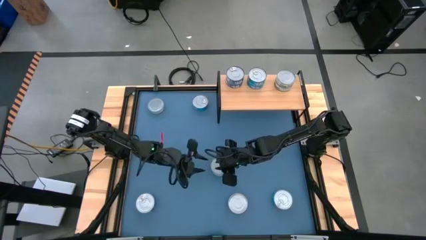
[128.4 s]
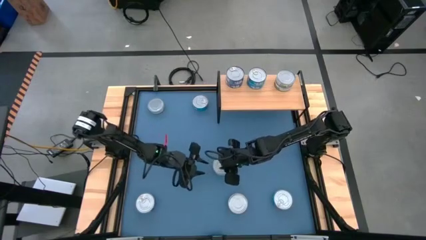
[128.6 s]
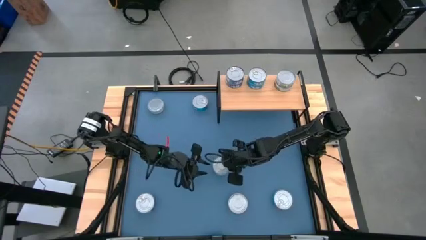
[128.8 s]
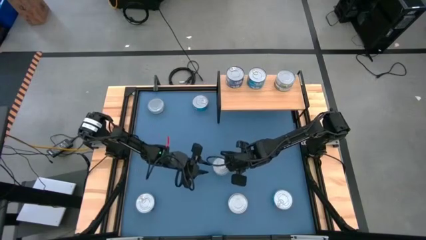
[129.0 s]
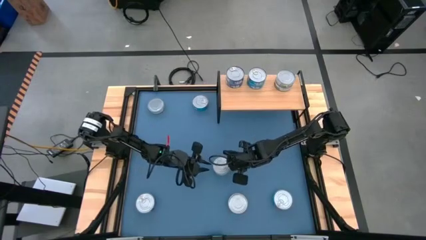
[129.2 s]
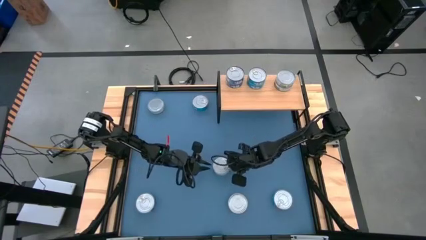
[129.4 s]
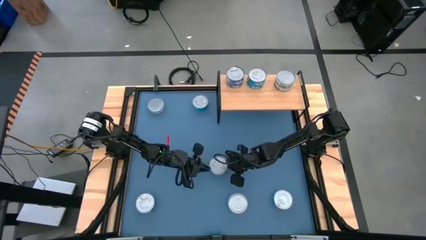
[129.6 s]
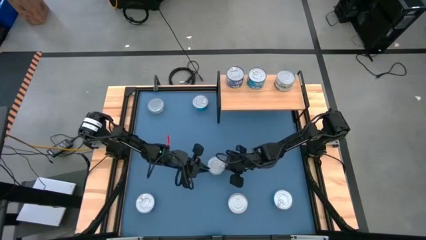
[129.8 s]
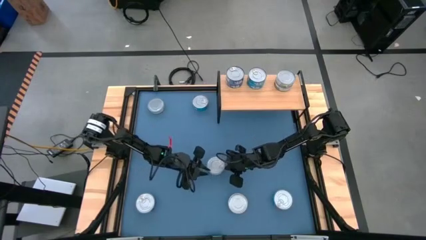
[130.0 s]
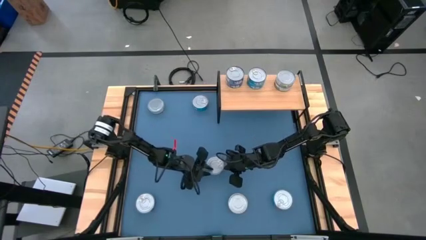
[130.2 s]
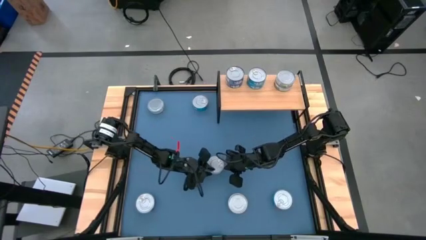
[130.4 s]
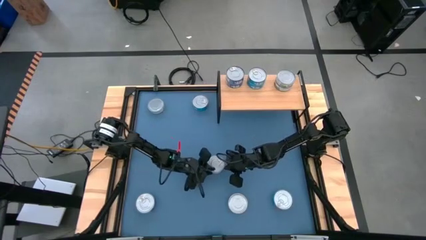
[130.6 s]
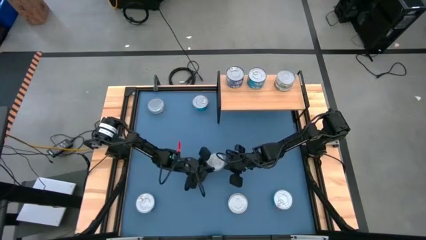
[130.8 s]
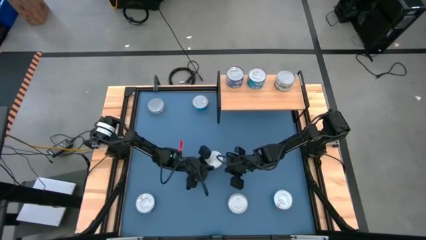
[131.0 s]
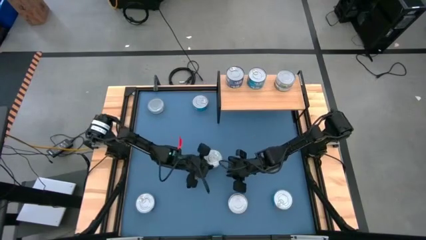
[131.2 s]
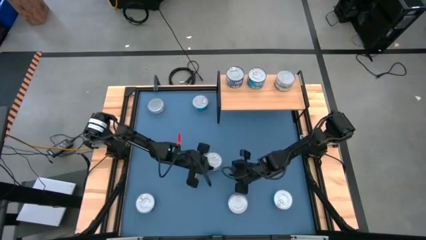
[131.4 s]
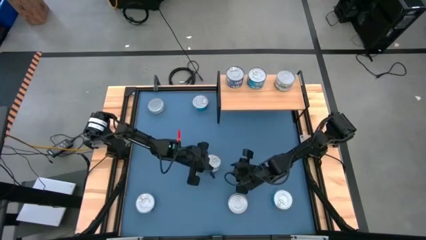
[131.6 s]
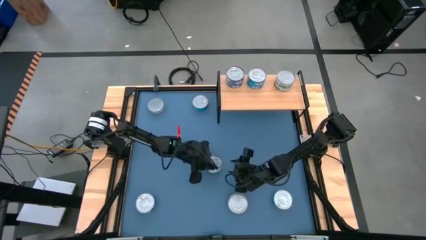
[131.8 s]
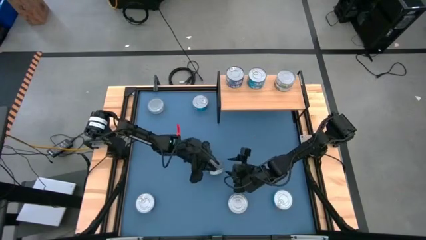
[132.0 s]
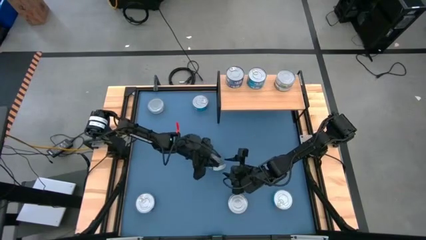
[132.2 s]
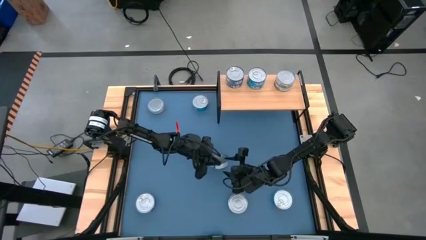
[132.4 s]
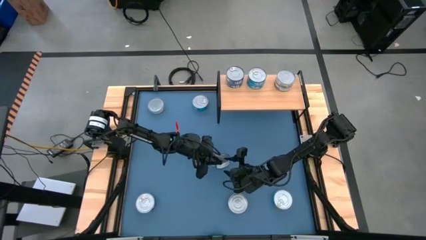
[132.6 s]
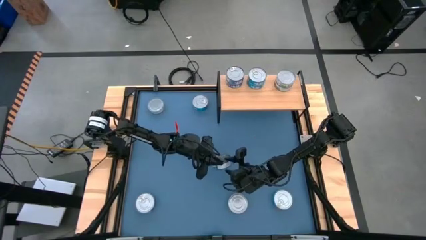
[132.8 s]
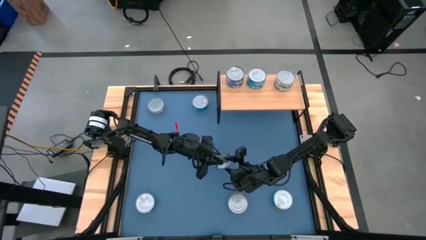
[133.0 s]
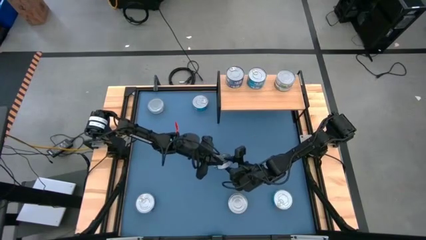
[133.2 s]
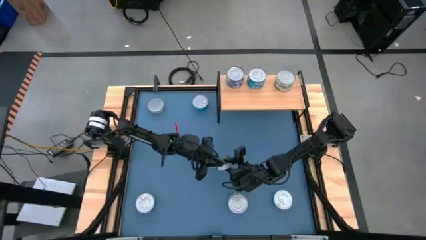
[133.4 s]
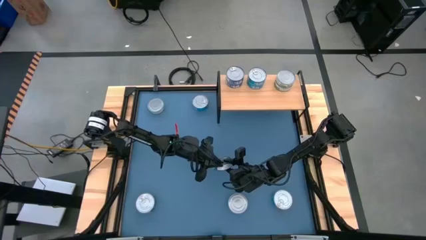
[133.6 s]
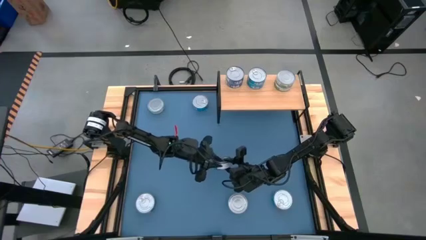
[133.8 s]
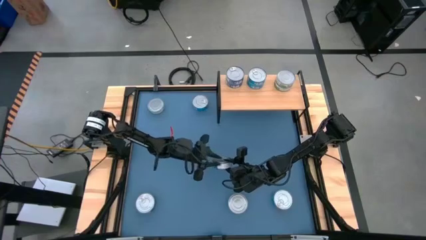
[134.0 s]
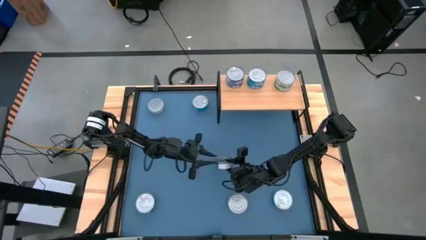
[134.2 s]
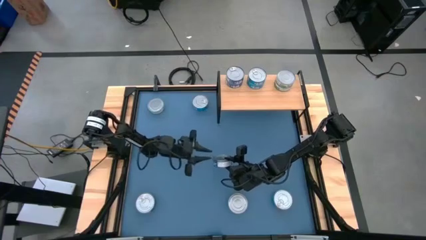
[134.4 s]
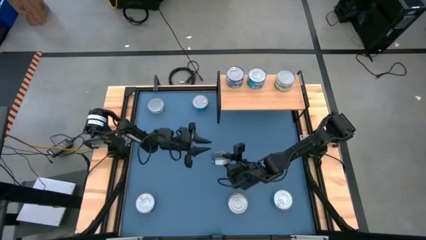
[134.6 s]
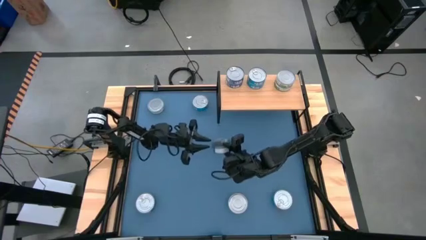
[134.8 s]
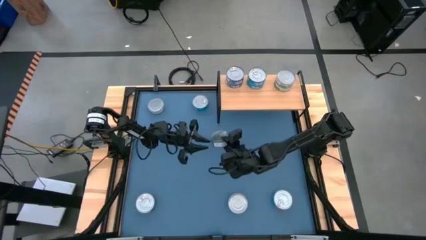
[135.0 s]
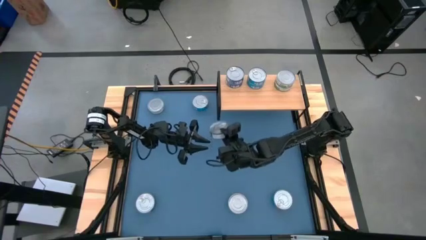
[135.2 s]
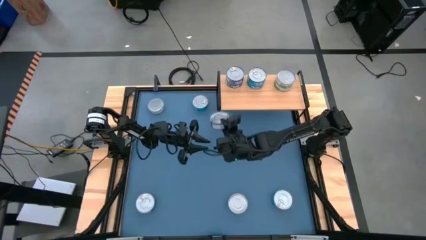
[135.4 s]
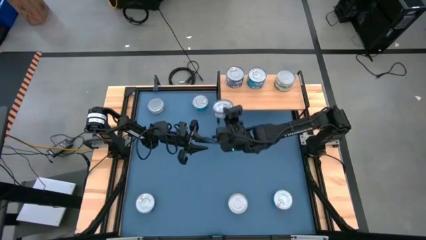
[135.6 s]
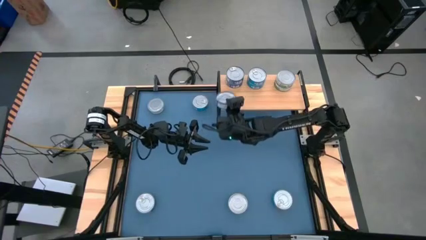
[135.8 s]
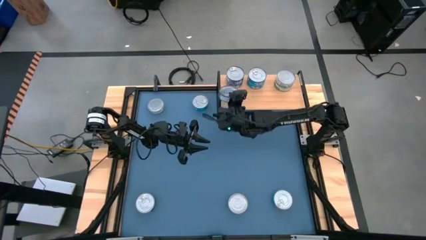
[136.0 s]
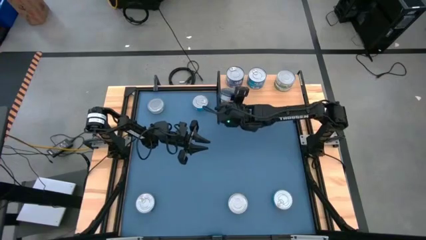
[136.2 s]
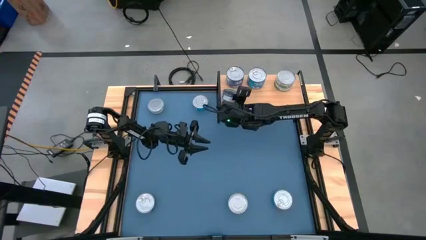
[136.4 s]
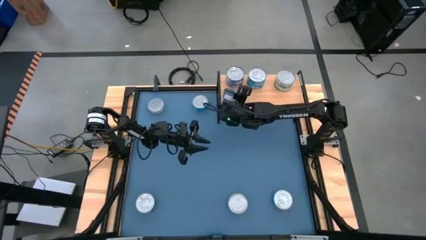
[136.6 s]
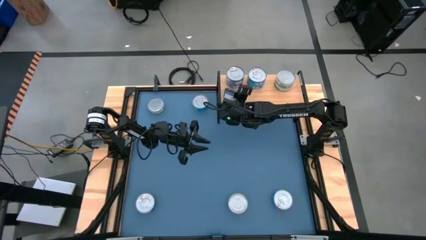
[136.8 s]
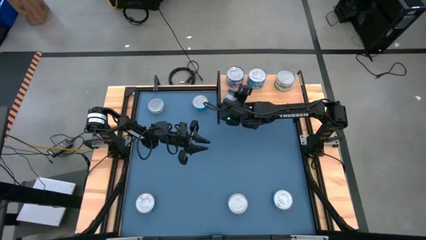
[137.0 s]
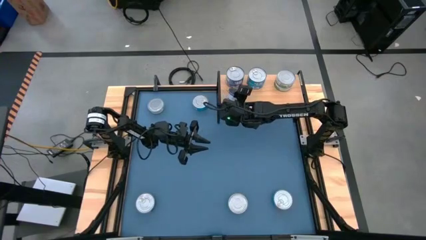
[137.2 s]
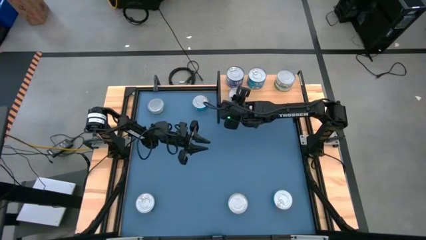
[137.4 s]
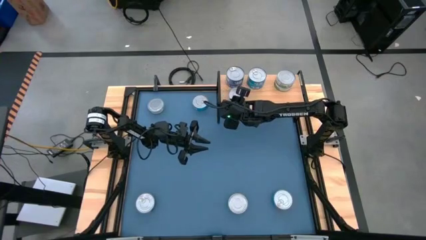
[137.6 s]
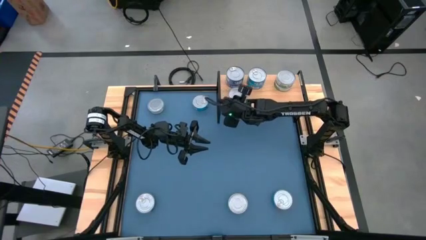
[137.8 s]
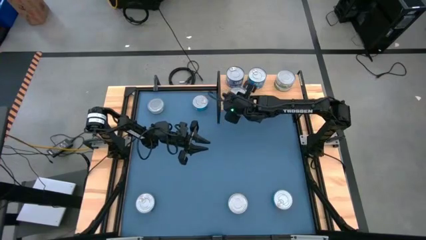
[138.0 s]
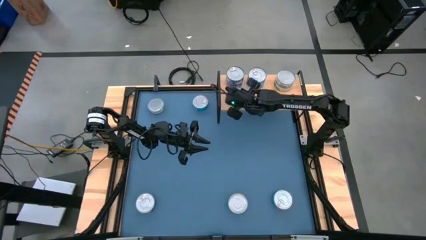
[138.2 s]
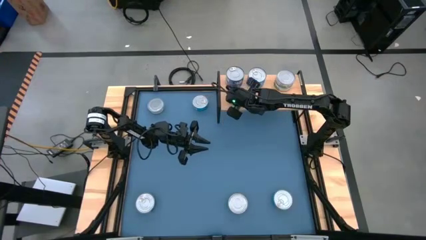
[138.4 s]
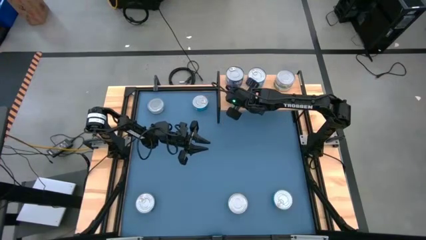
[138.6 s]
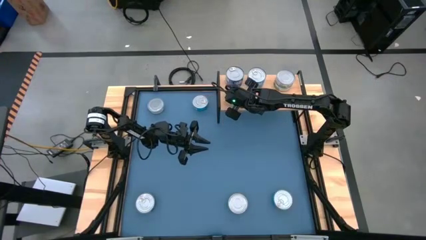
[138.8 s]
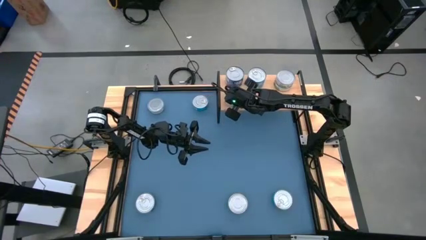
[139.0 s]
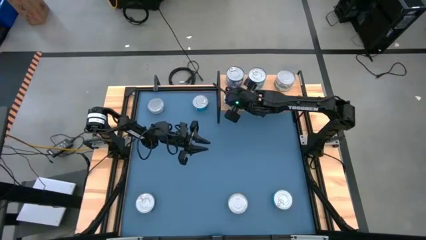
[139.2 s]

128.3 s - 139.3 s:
Task: Stack canned seafood by type on shelf
Put the center blue tuna can on the shelf aligned with the other blue tuna cans on the shelf

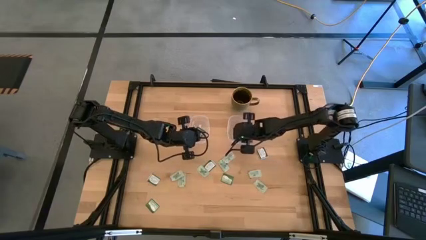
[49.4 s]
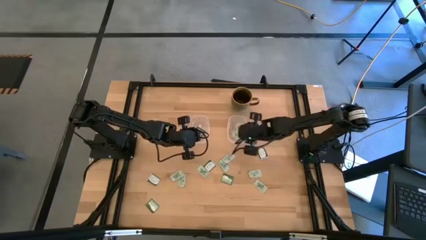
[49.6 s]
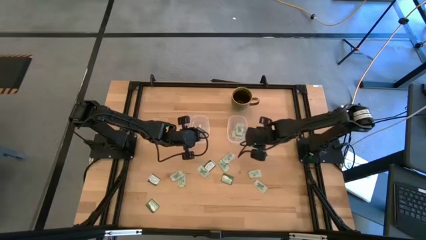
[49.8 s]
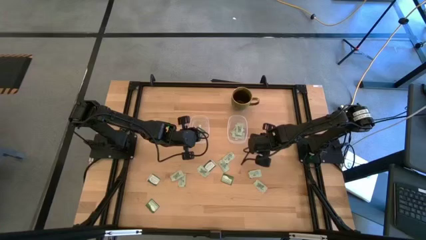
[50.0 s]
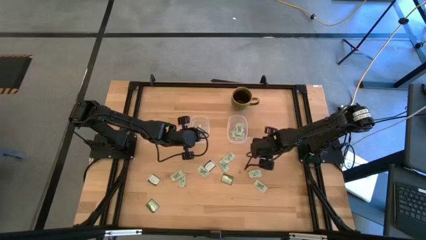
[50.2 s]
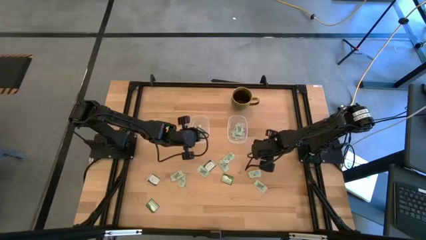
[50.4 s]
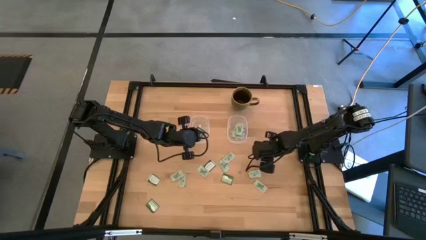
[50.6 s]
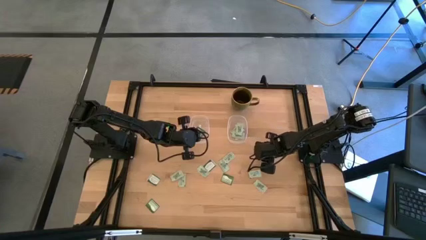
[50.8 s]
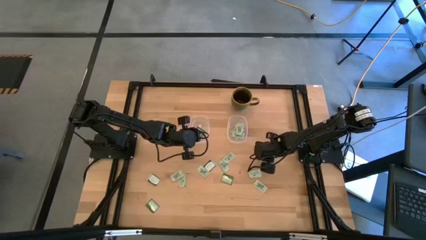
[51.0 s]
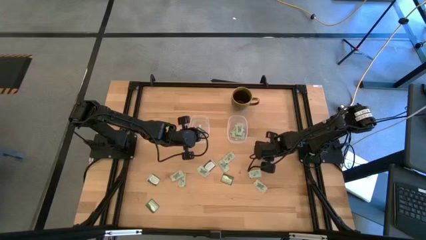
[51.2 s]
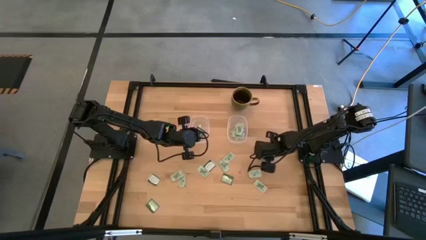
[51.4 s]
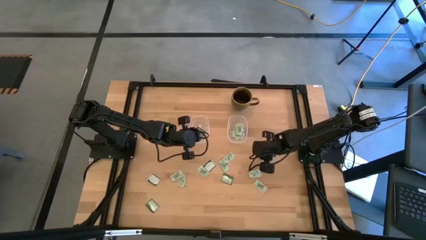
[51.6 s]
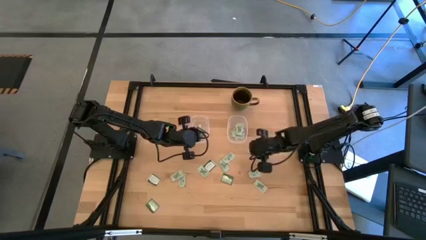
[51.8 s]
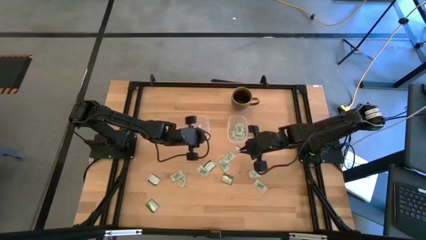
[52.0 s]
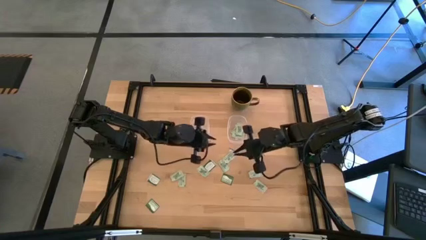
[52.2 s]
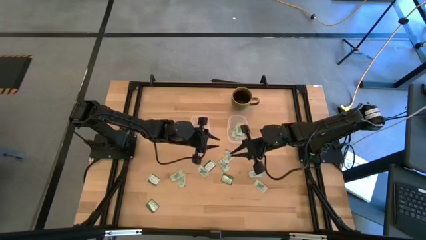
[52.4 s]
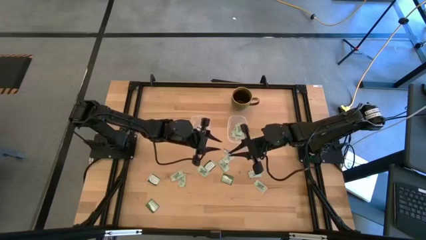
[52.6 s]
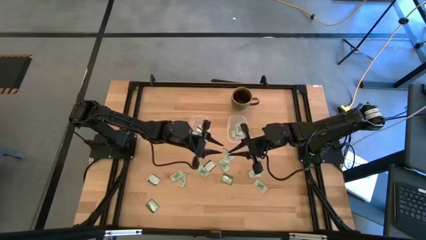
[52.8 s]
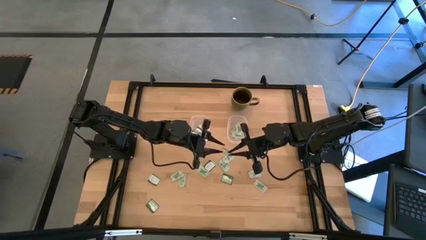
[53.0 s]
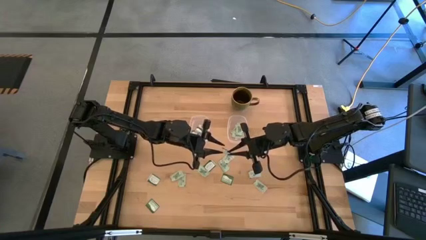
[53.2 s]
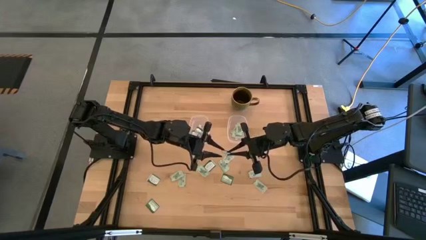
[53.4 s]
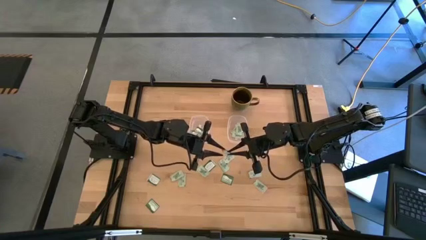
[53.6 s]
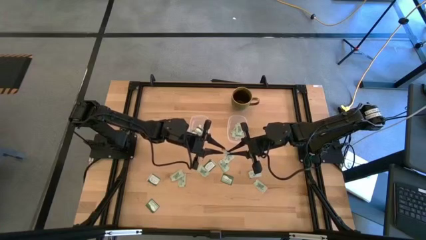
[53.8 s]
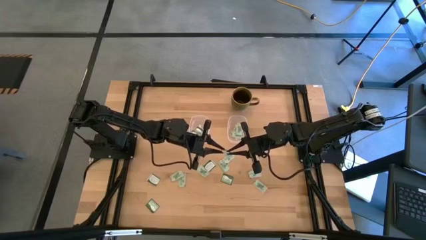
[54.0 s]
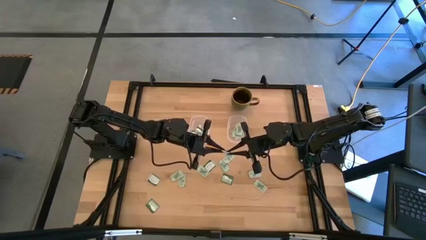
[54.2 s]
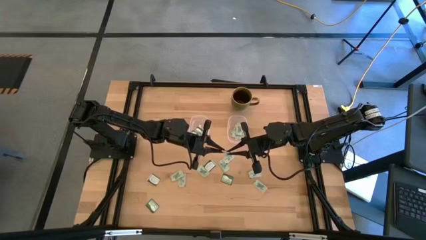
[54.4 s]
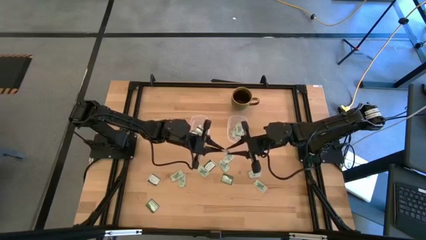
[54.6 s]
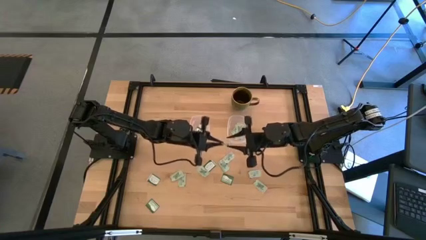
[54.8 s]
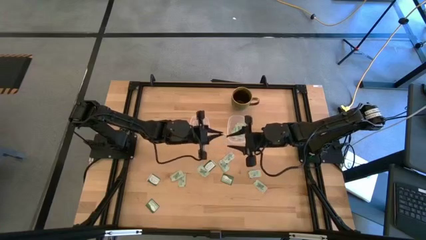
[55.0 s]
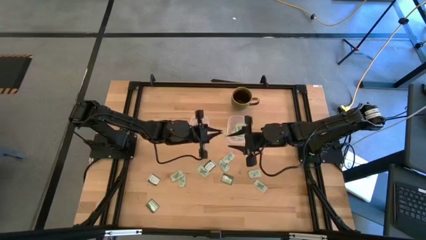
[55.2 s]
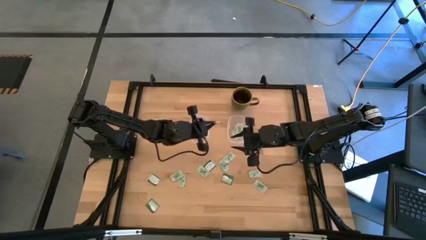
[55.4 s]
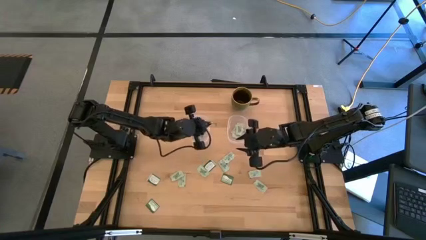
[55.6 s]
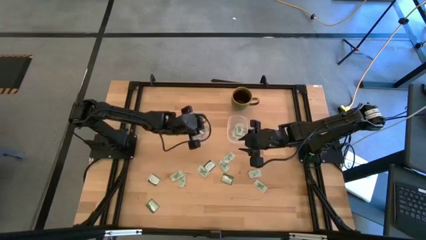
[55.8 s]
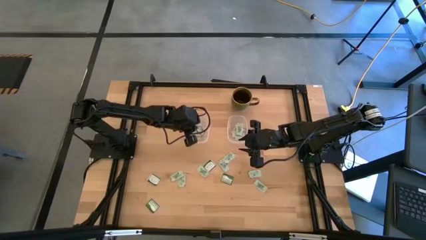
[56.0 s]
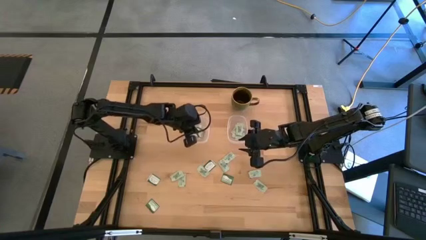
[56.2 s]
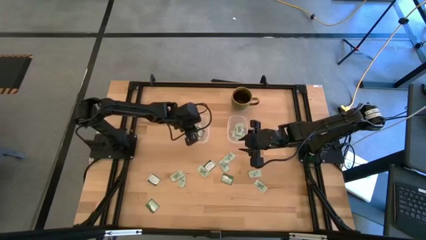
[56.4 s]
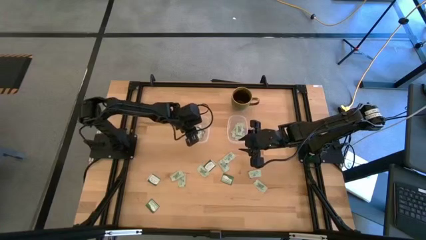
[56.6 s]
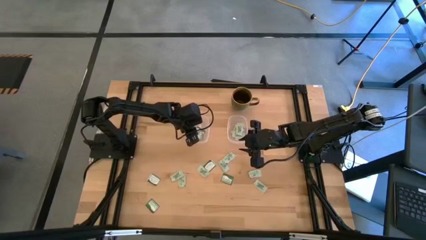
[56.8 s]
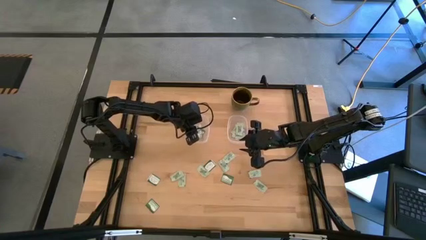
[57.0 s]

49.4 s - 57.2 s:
Task: Pick and place items into bin
Put the truvia packet into the left transparent bin
